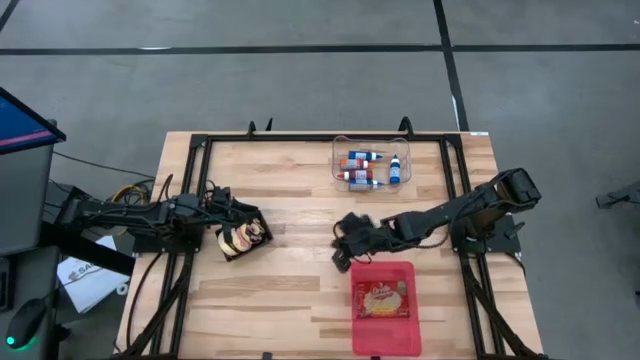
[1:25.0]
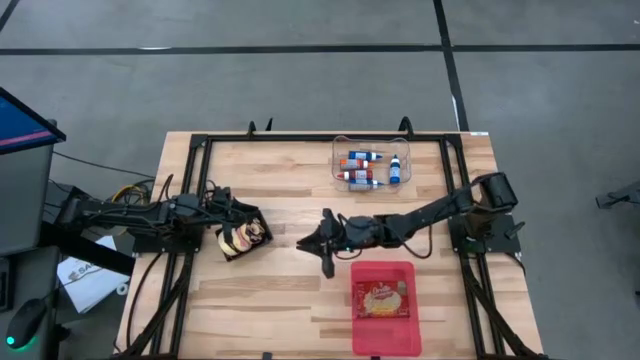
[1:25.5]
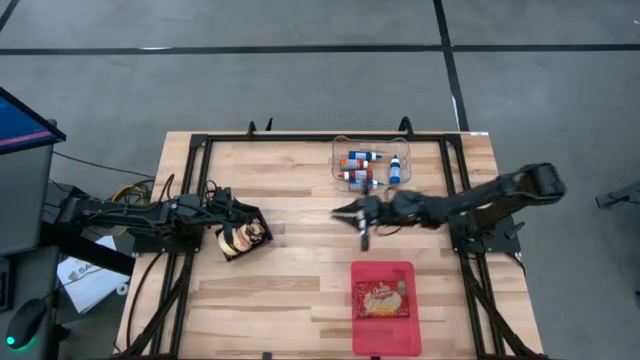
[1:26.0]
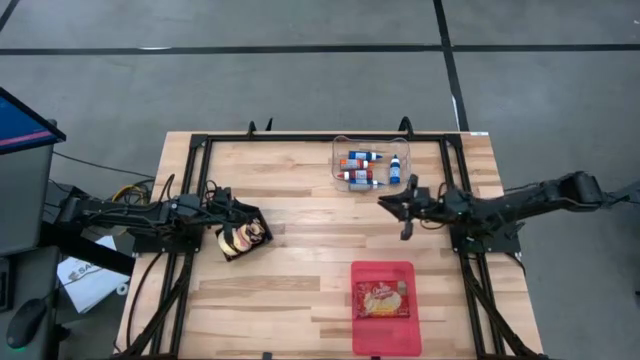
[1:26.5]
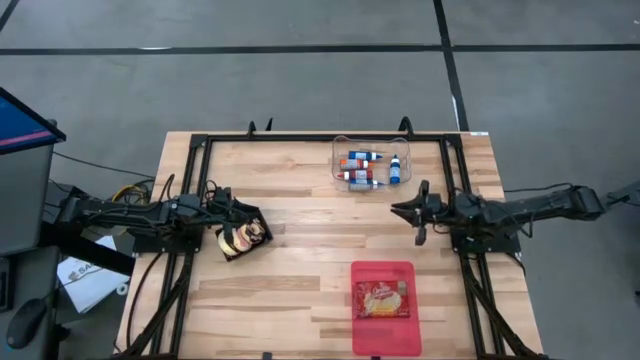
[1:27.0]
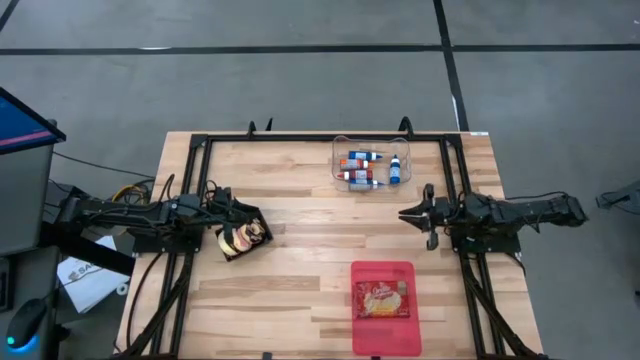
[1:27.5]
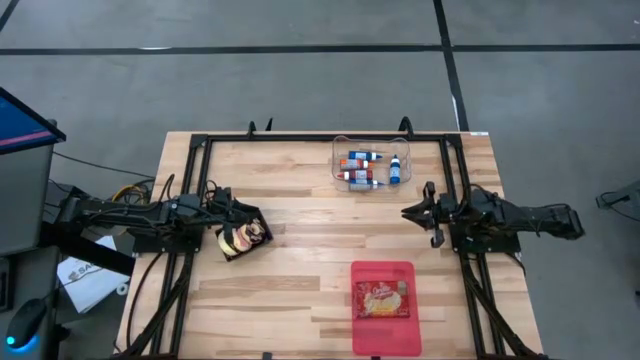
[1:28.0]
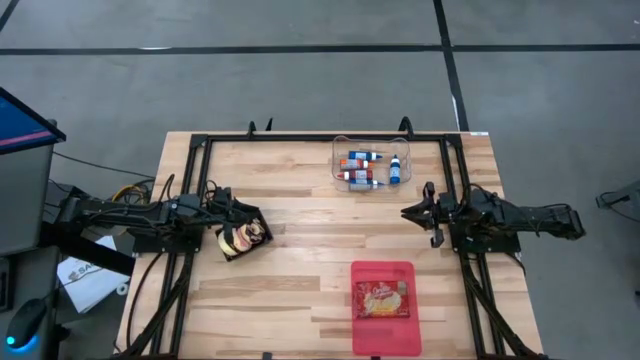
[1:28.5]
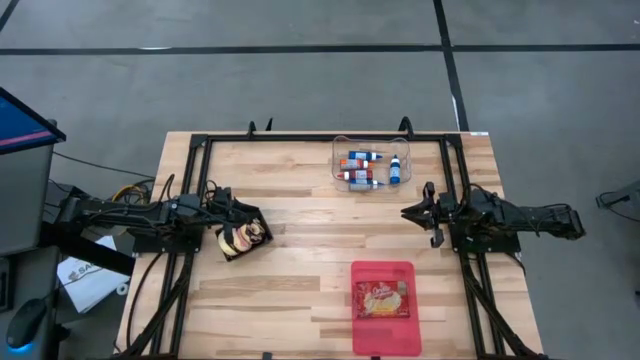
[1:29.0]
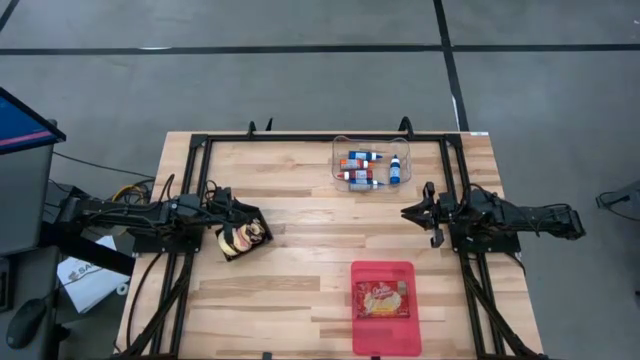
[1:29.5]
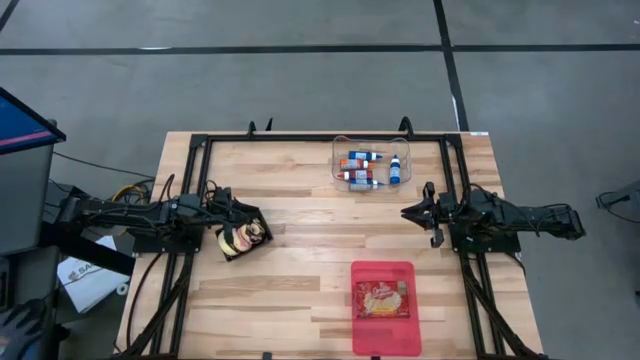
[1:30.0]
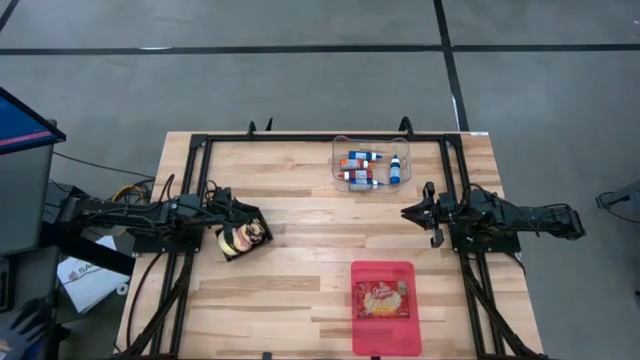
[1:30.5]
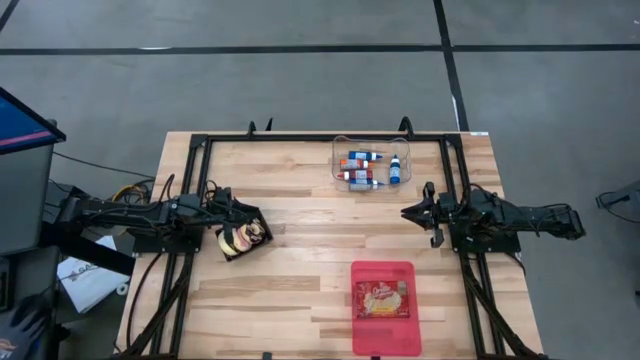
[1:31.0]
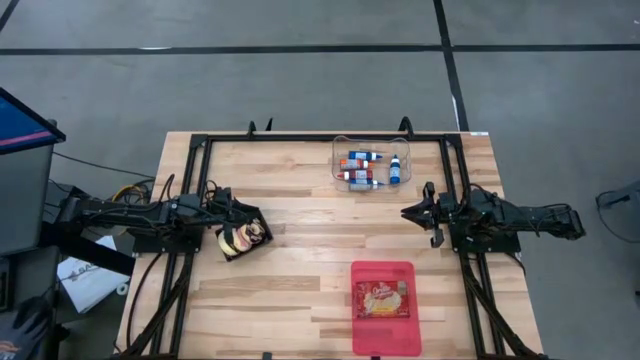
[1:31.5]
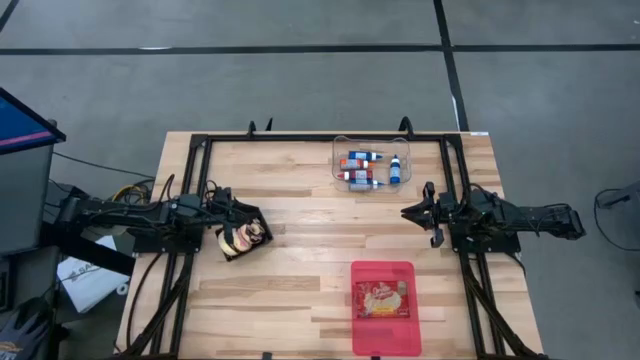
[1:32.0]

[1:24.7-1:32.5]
Return to Home Position

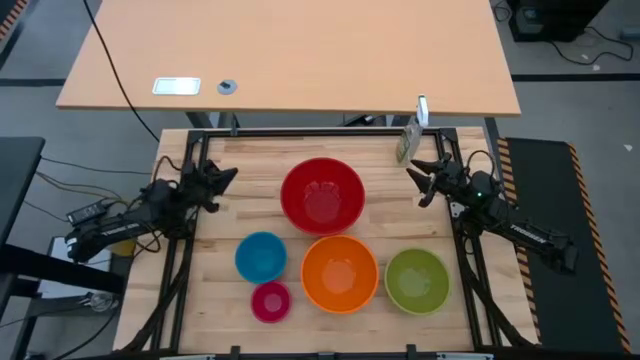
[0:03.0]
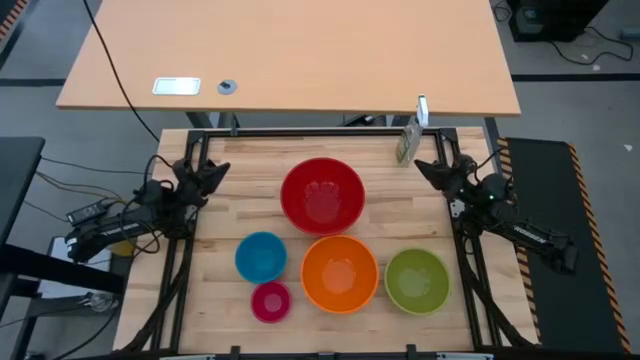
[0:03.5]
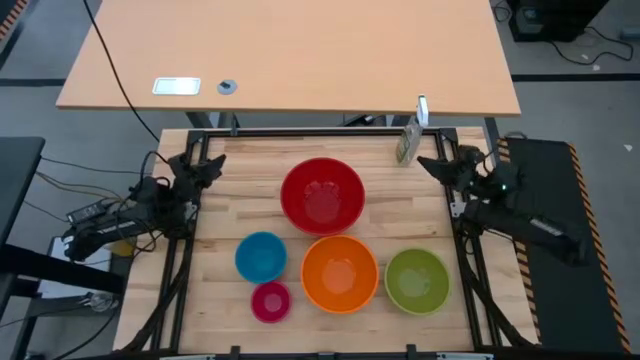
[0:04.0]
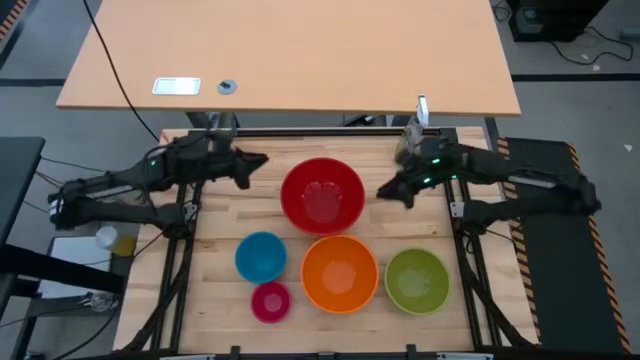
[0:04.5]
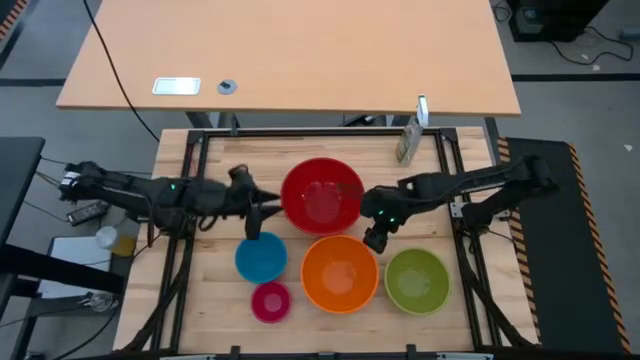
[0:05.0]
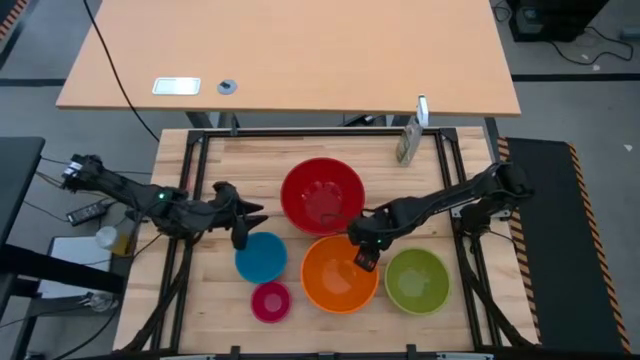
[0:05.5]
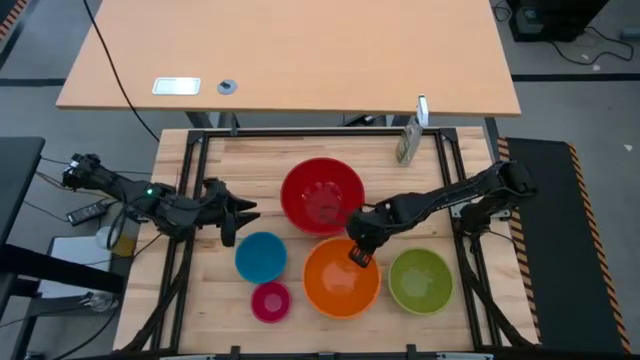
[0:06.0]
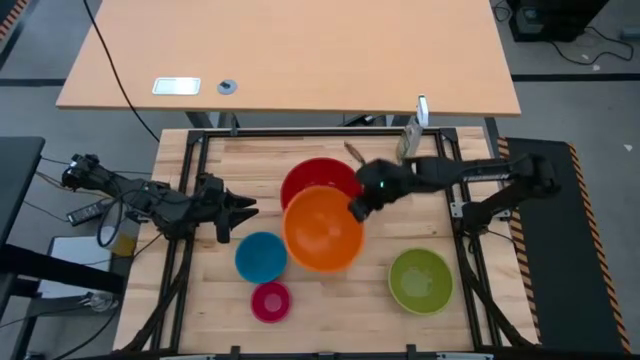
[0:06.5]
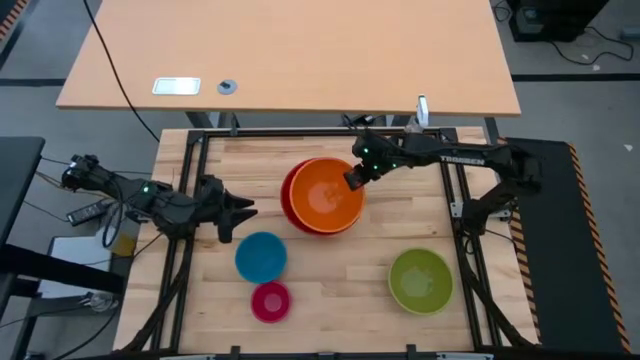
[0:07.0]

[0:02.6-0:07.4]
Stack the orange bowl on top of the red bowl

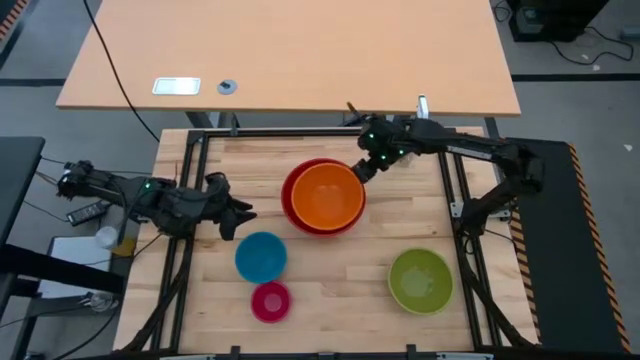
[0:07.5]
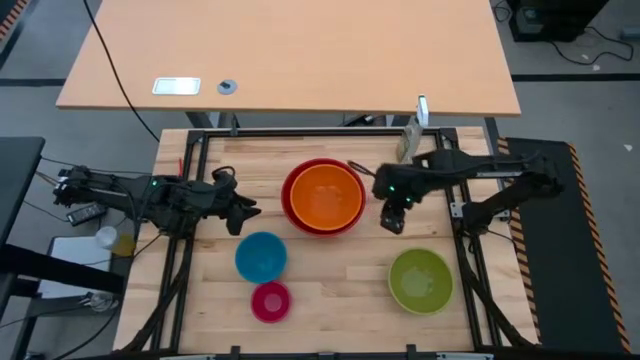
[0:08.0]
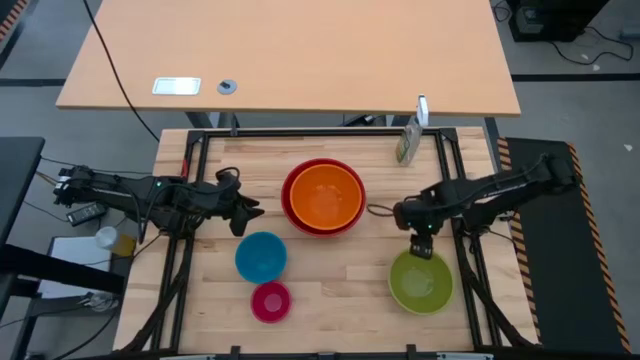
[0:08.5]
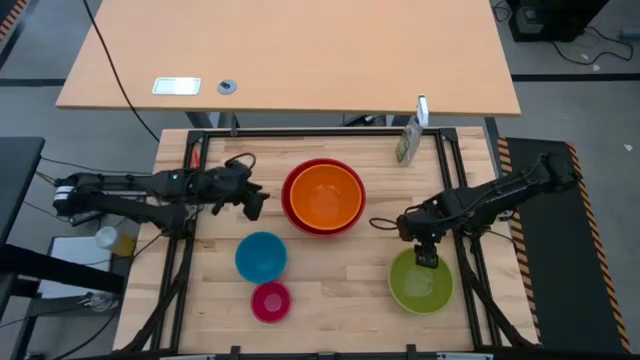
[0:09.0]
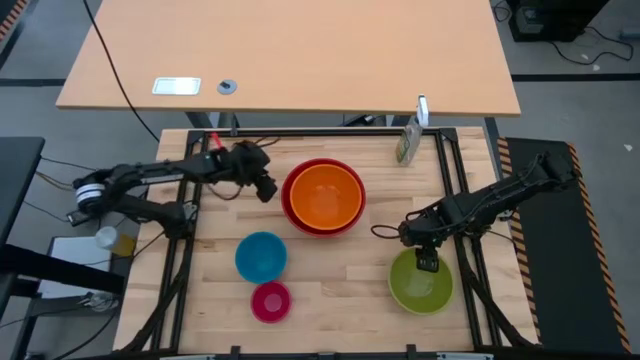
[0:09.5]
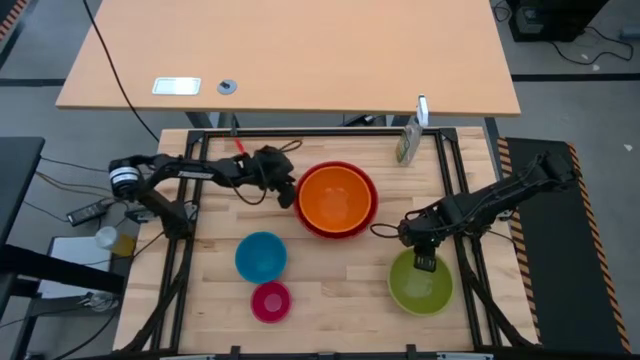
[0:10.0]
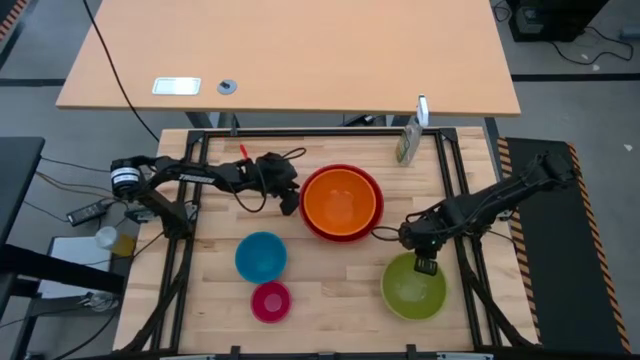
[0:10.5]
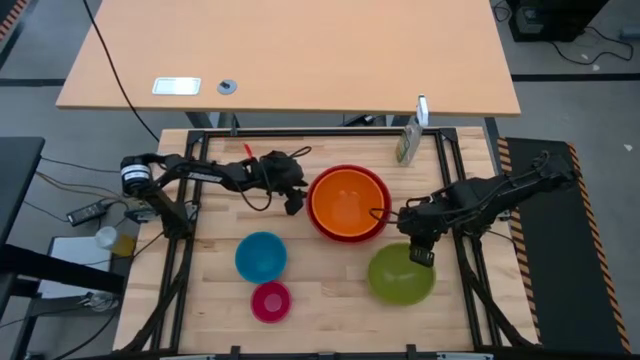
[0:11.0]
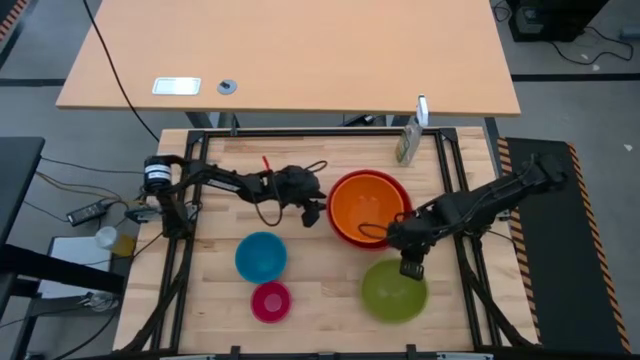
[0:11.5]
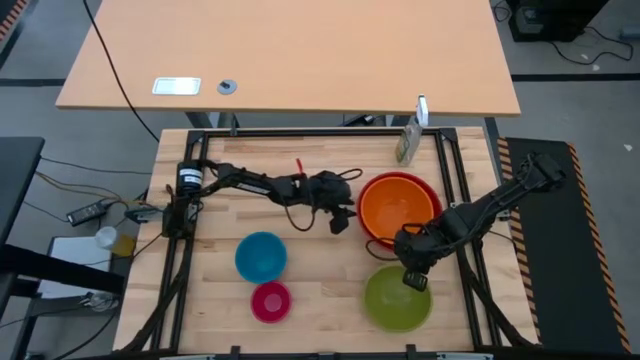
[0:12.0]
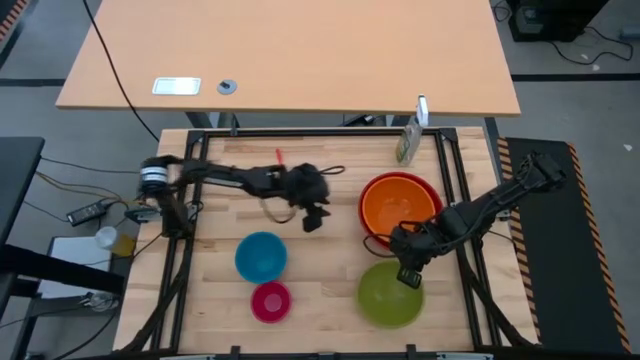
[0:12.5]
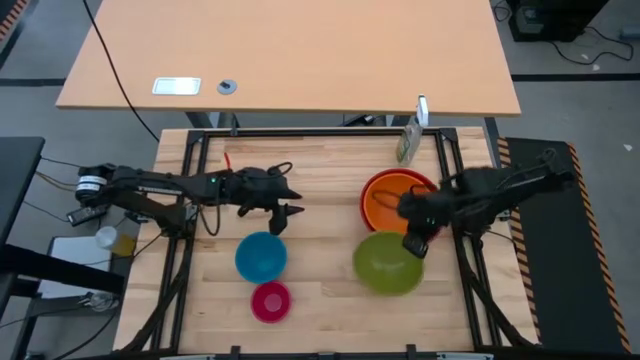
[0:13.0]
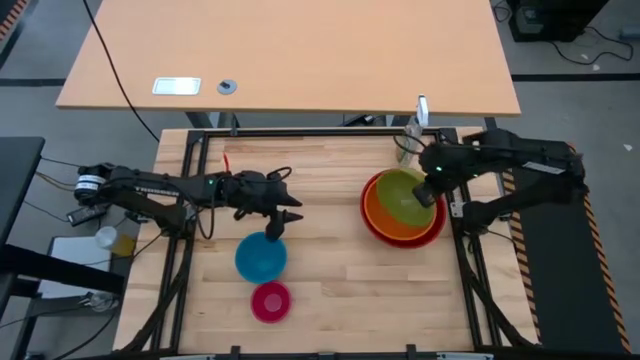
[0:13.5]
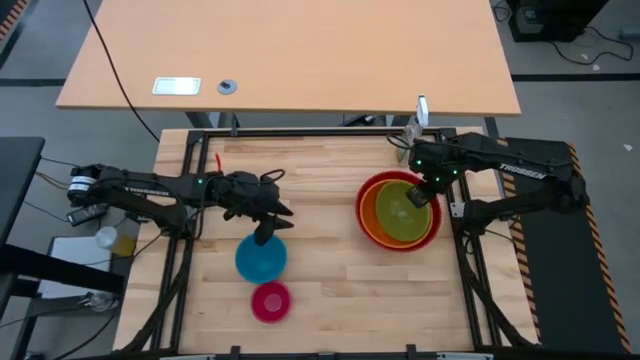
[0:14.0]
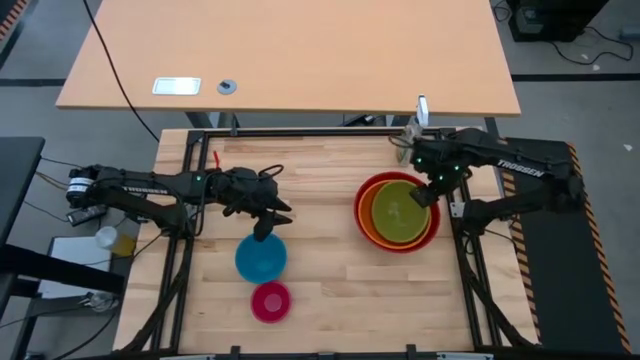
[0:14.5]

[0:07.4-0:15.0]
Stack the green bowl on top of the orange bowl

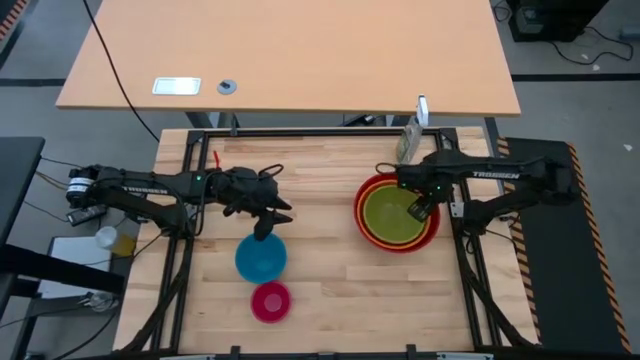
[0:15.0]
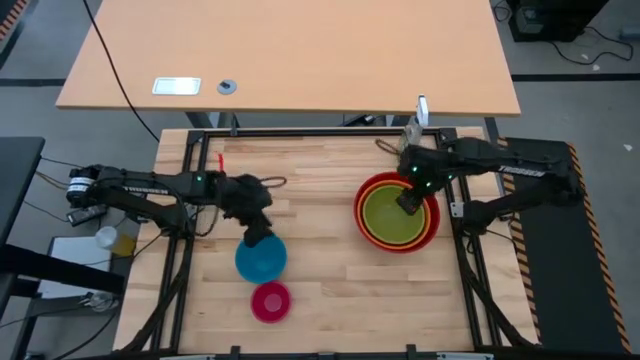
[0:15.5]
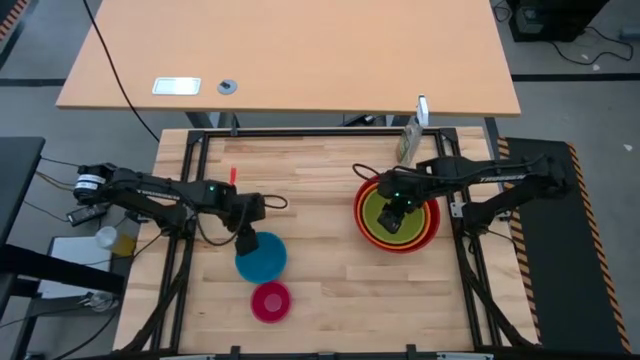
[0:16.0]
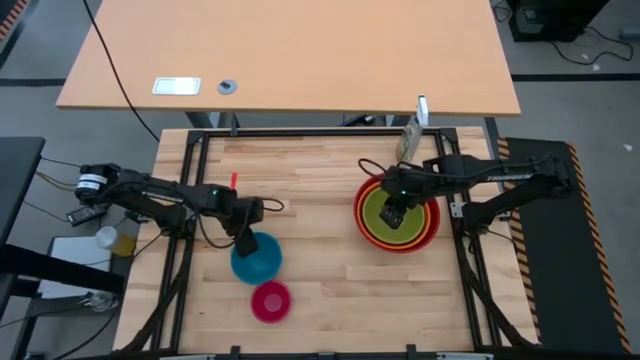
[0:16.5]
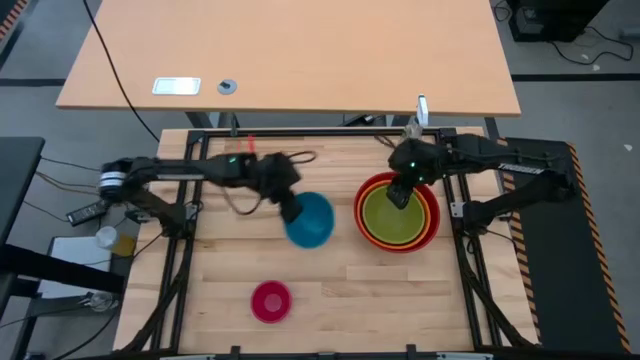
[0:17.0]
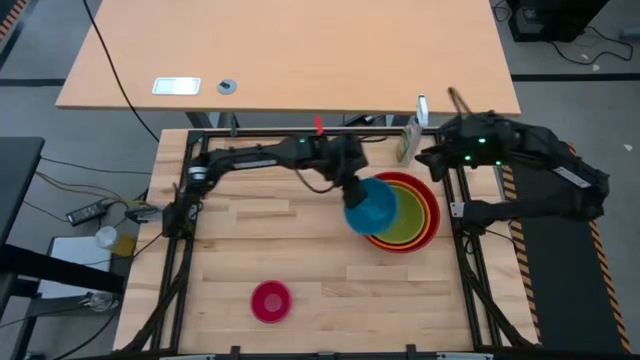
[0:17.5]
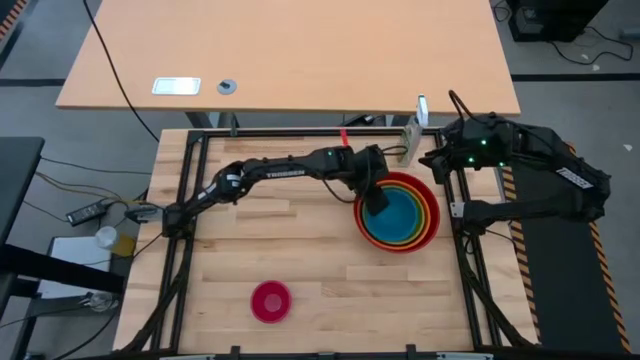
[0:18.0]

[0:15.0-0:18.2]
Stack the blue bowl on top of the green bowl
